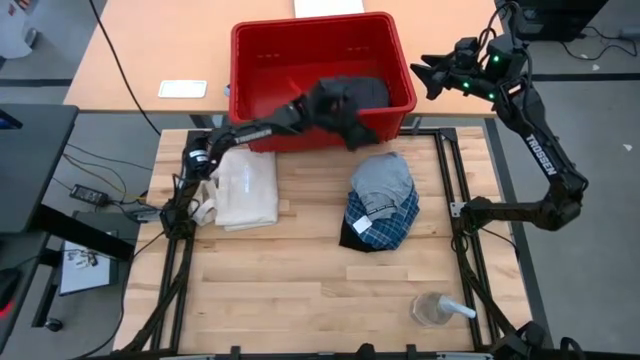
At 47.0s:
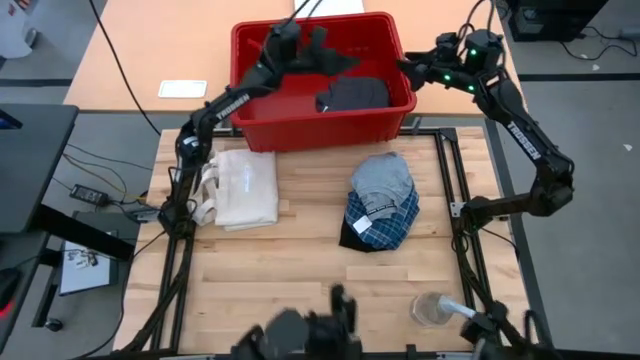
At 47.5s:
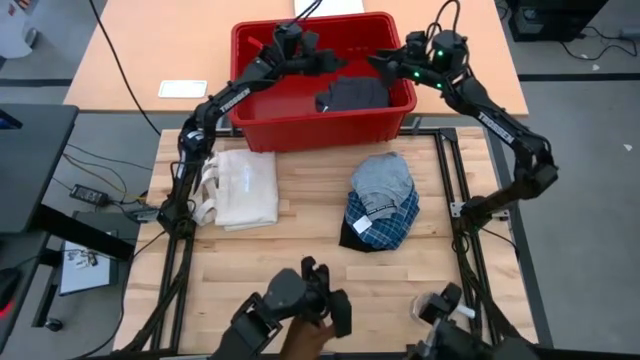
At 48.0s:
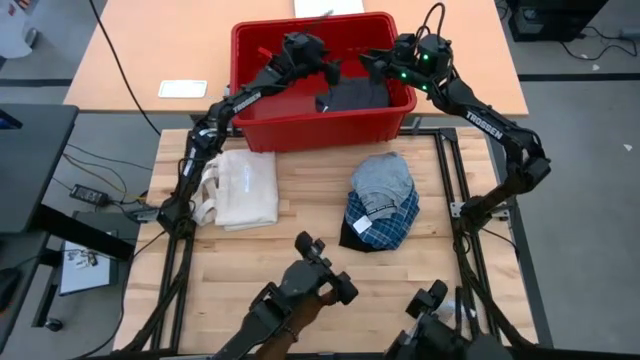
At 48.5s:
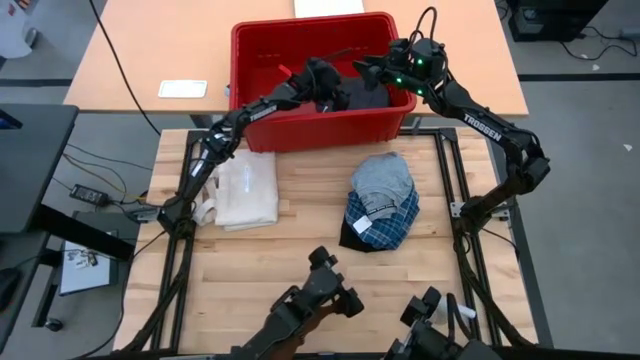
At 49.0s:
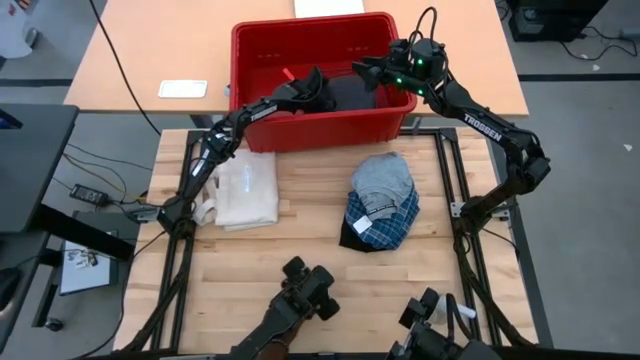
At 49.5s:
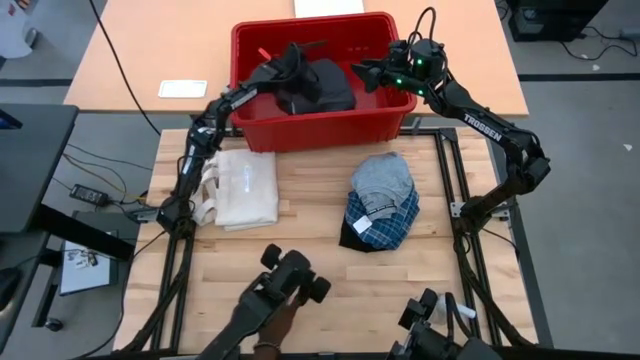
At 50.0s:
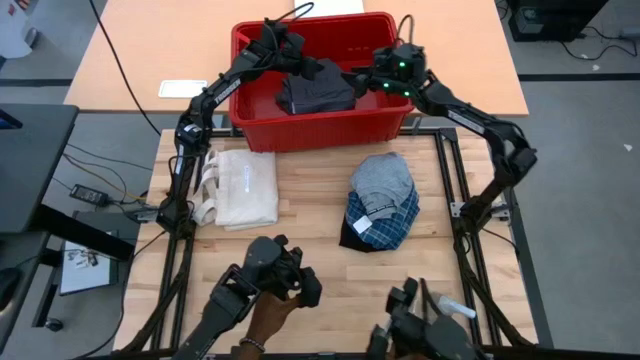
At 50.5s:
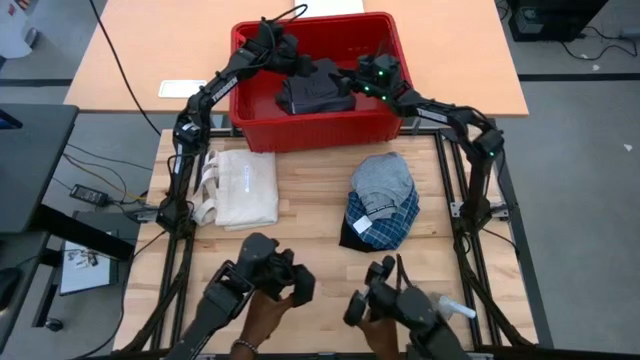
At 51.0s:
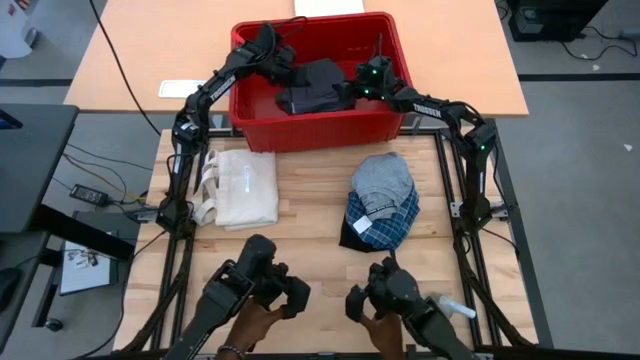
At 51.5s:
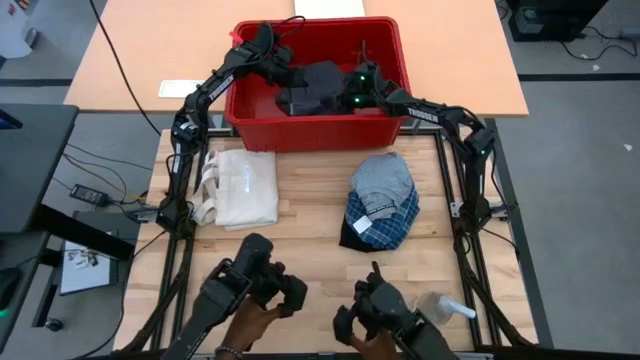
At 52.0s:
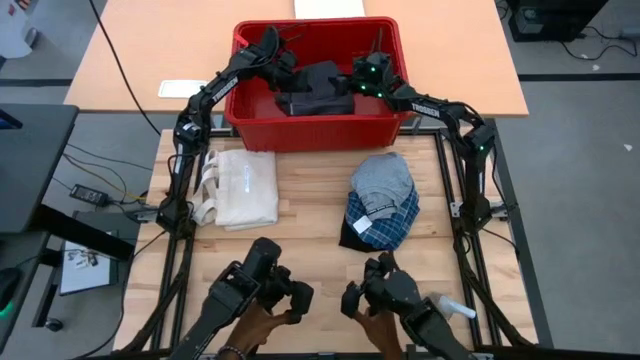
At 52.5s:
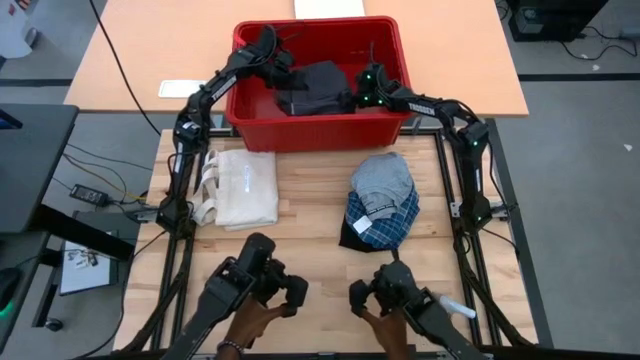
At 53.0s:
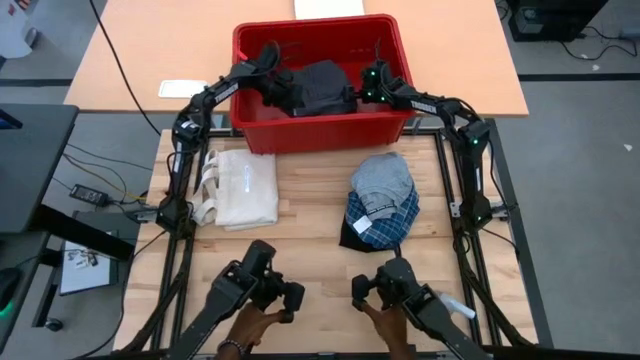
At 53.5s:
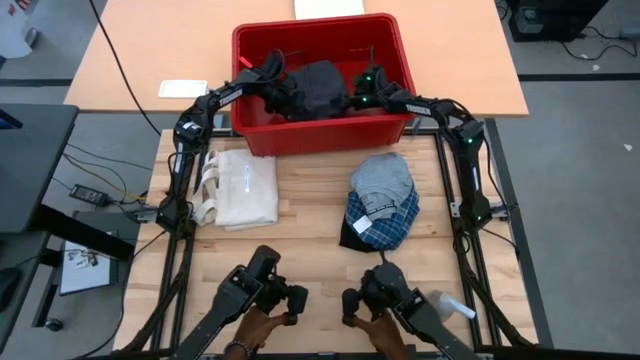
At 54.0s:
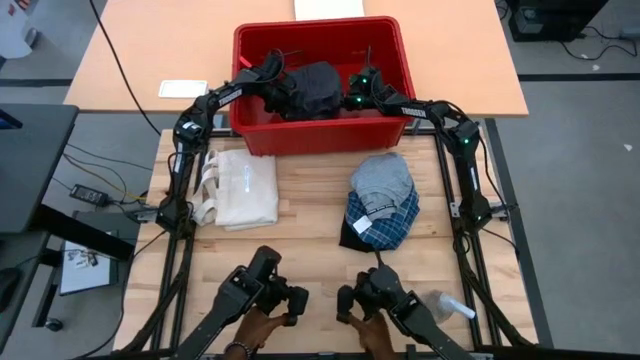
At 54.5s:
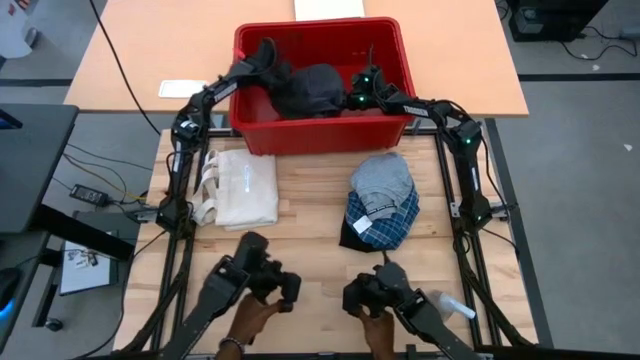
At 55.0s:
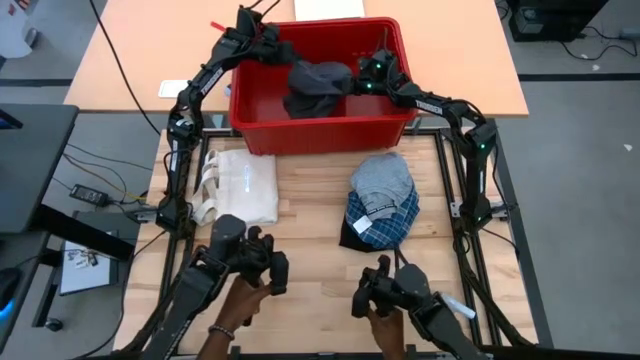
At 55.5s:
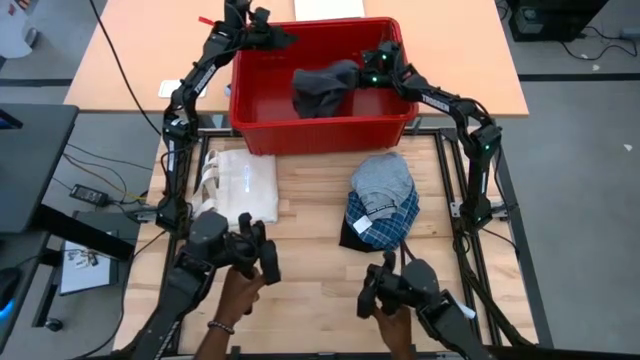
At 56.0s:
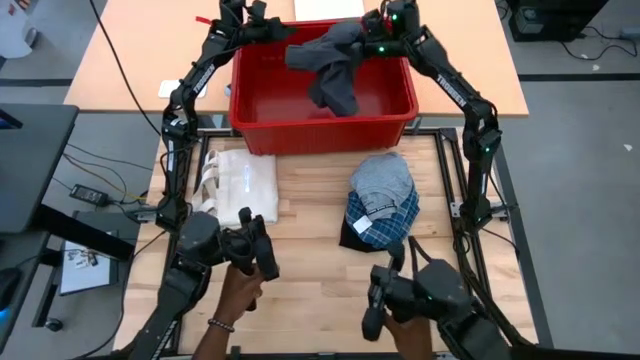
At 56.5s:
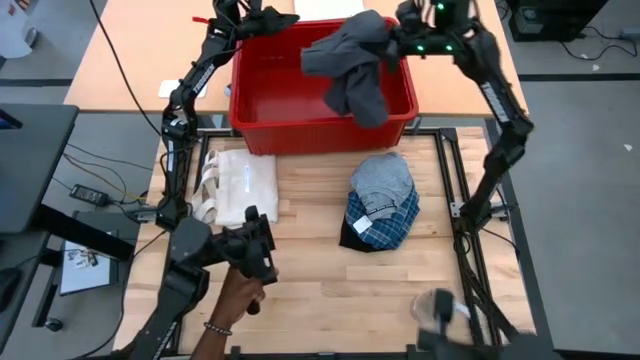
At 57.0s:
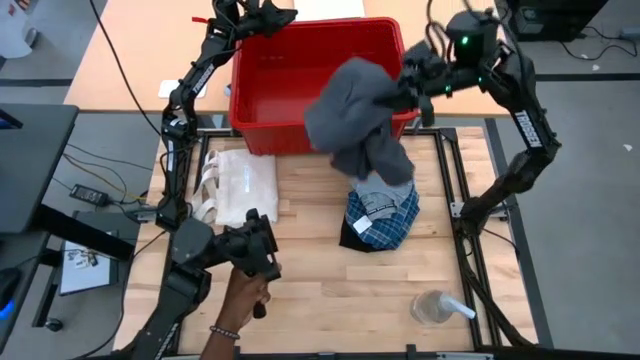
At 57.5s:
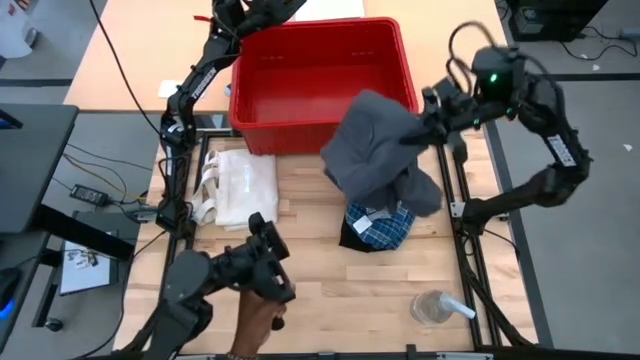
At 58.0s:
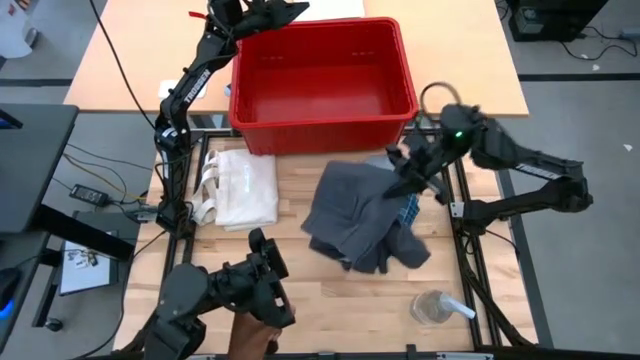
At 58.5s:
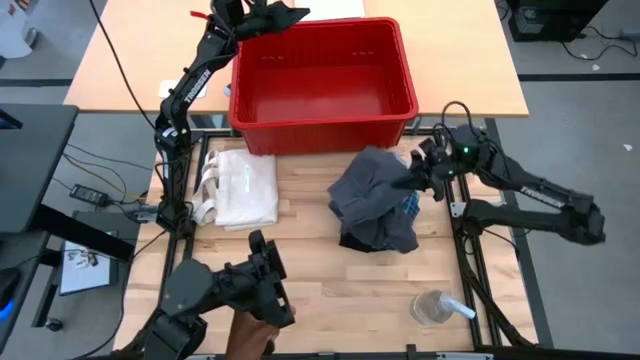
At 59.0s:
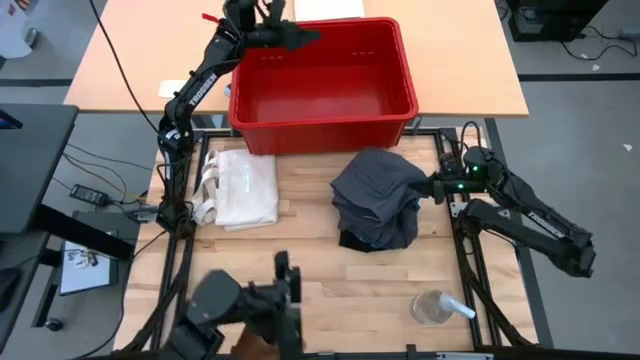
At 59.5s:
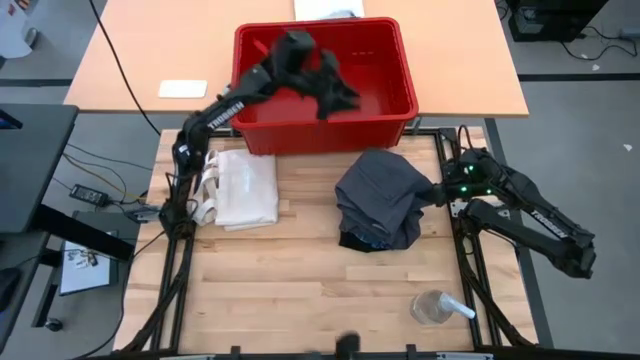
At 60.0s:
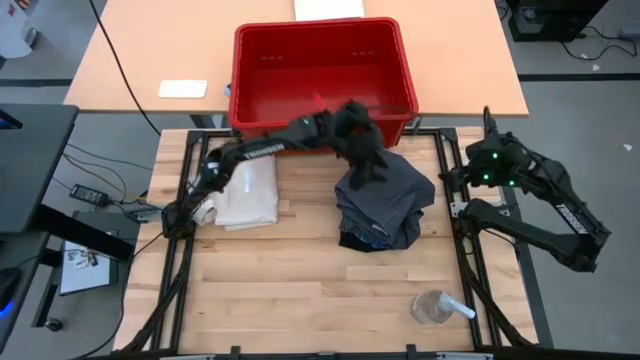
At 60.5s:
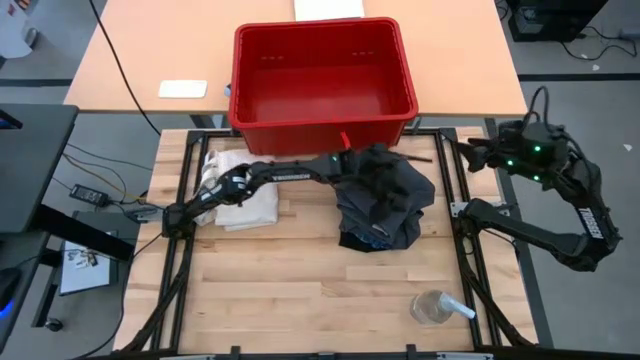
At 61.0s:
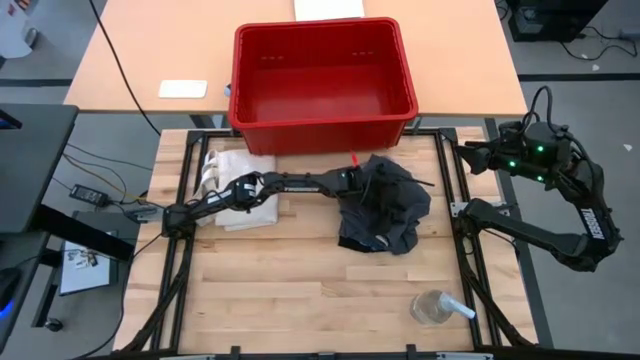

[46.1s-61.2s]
Task: Fold laundry
Remove the gray shorts from the red laundry bin

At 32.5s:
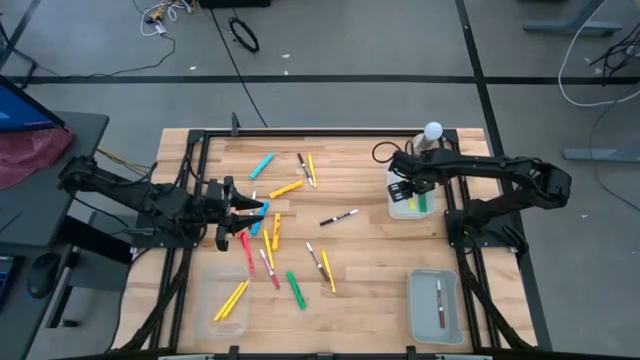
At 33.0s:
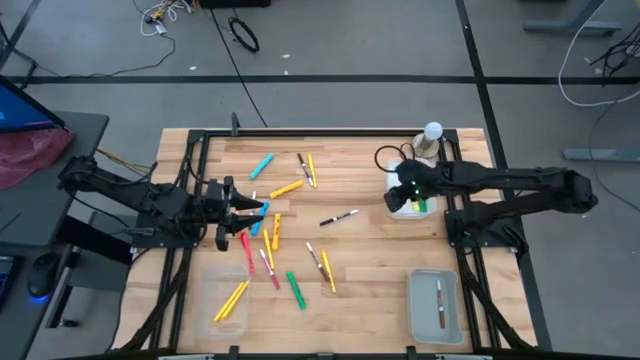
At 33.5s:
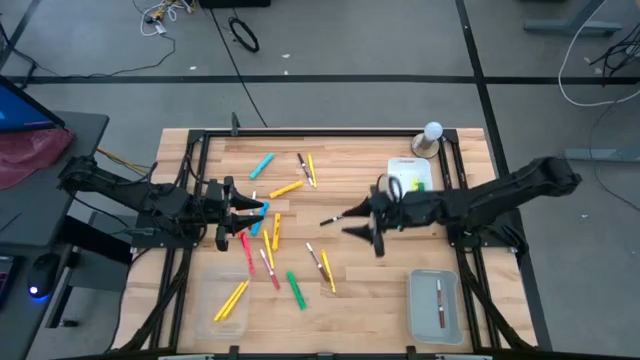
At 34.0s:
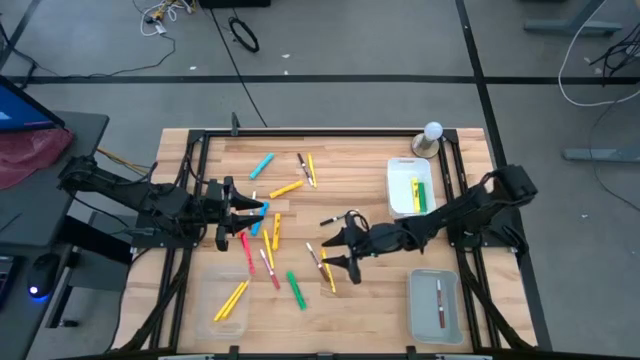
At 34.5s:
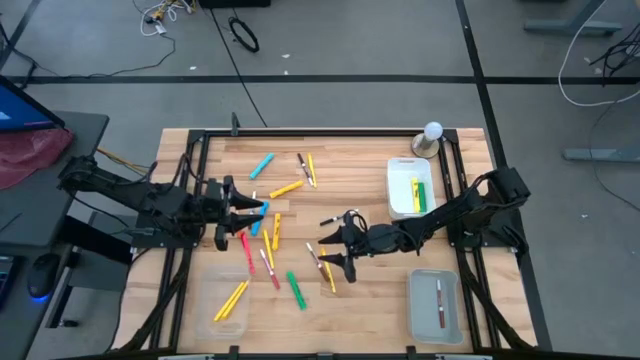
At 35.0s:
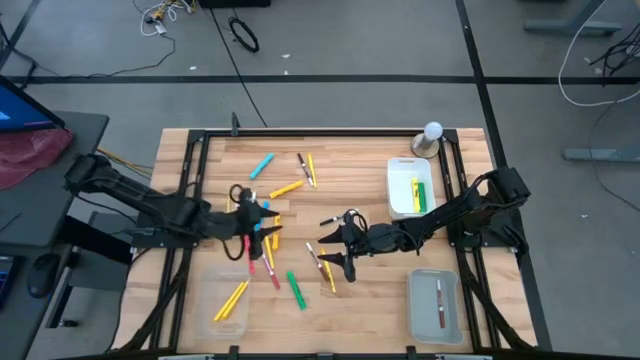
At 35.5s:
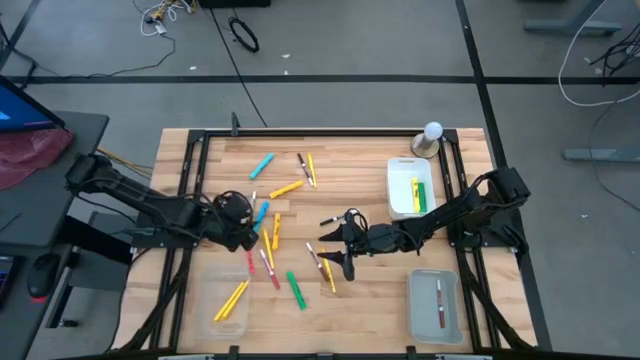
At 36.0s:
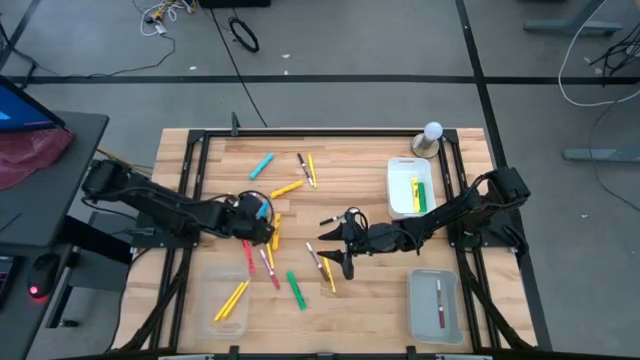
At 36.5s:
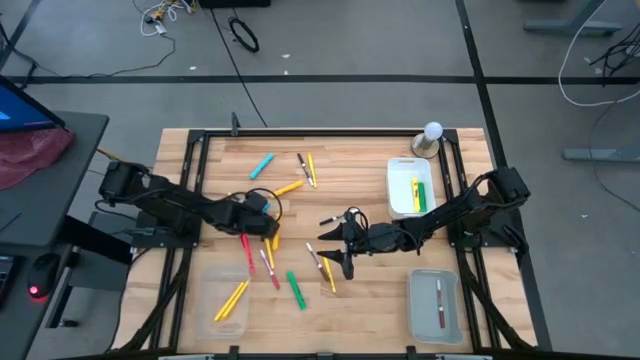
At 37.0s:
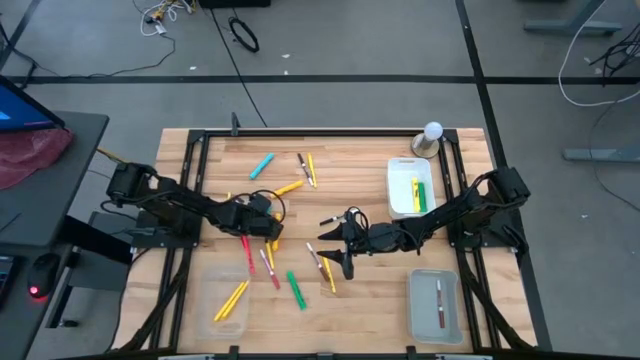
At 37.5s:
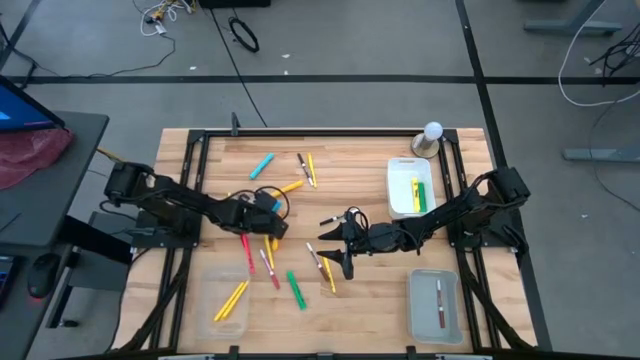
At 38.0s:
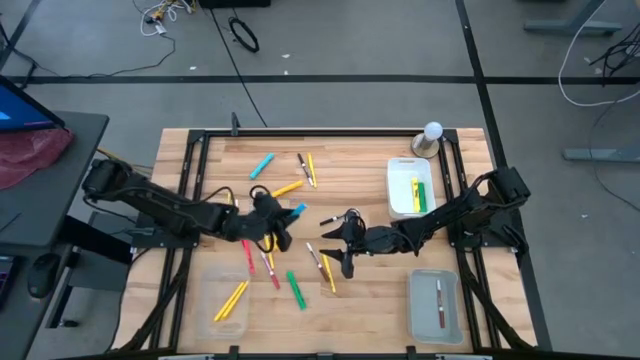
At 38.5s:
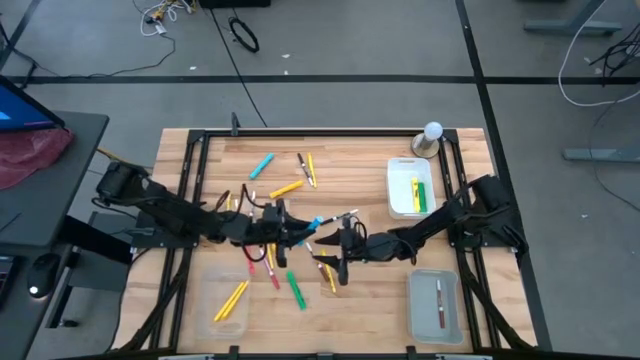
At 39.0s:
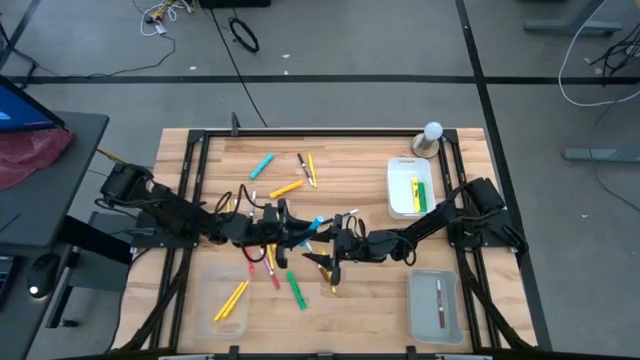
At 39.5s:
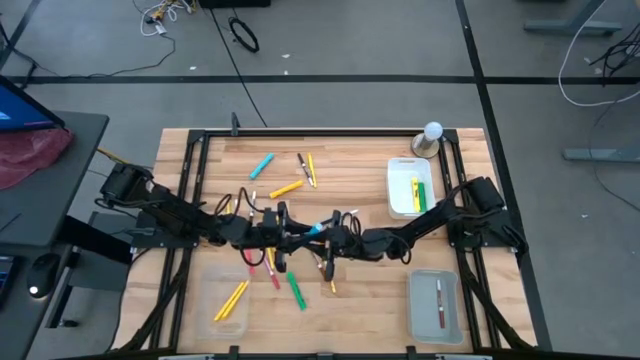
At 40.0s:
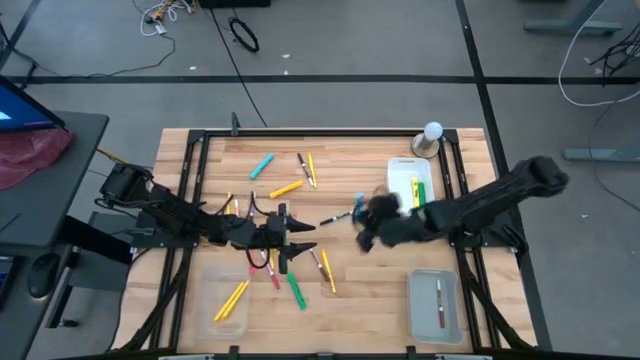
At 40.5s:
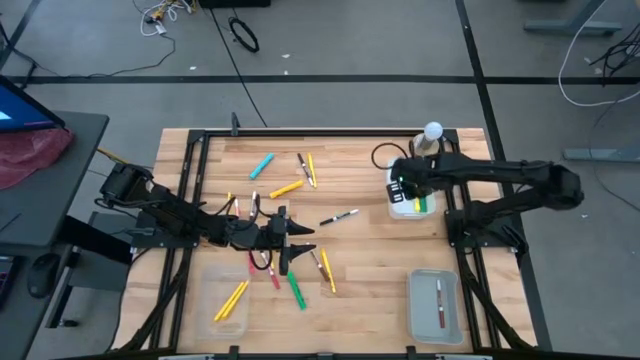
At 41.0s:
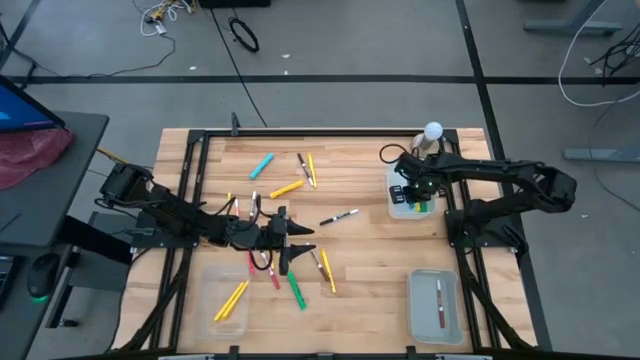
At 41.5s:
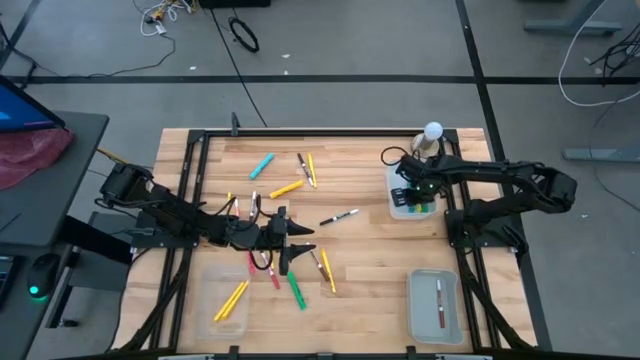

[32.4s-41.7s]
Task: Pick & Place Markers
Put the blue highlighter into the white bin
